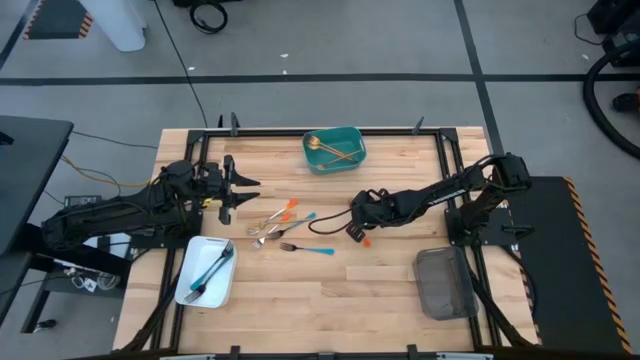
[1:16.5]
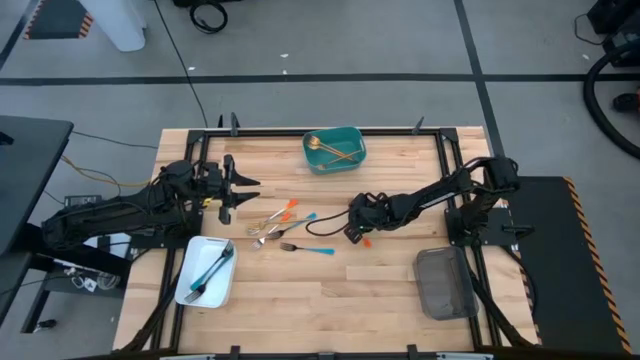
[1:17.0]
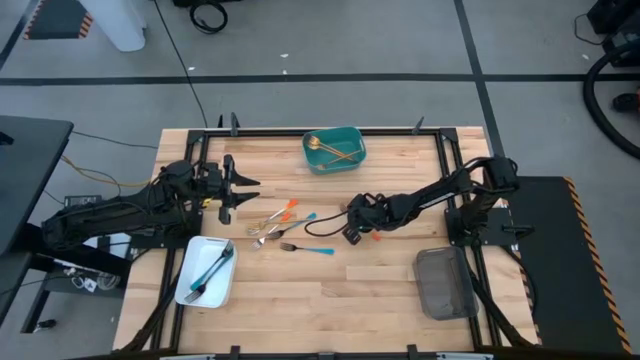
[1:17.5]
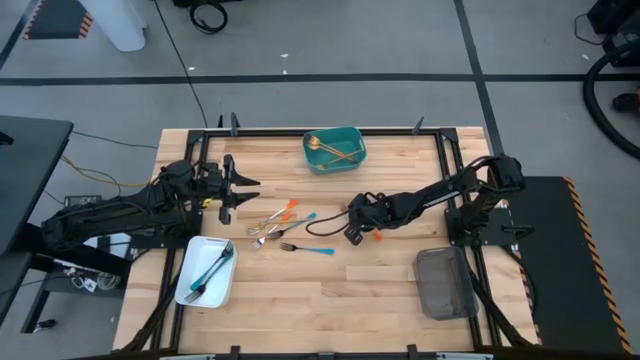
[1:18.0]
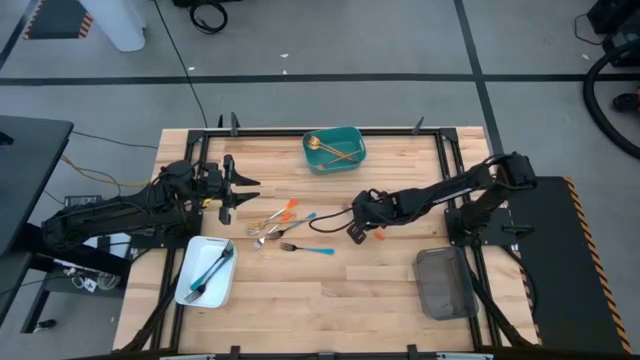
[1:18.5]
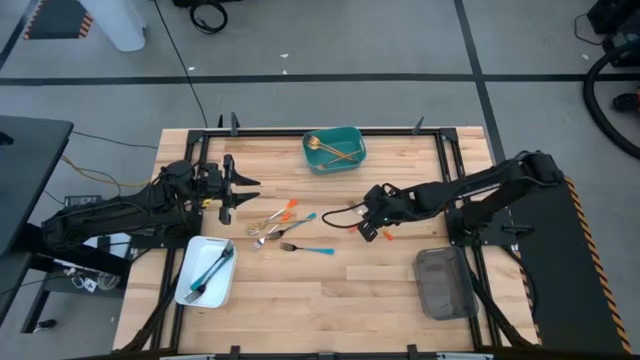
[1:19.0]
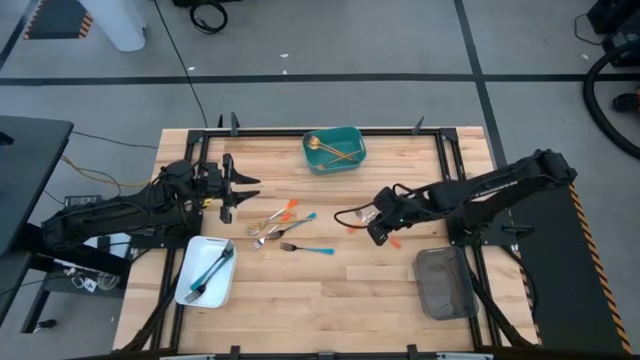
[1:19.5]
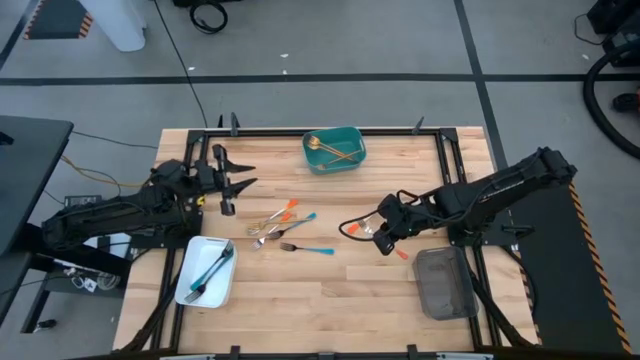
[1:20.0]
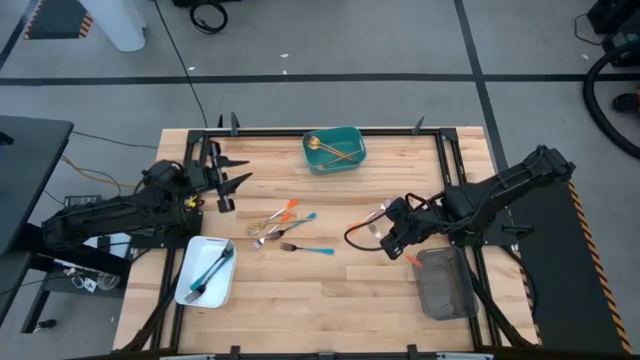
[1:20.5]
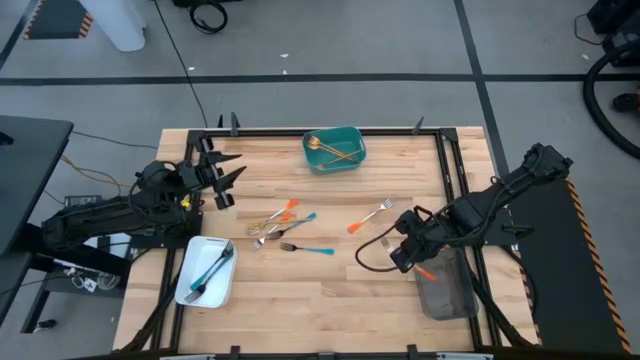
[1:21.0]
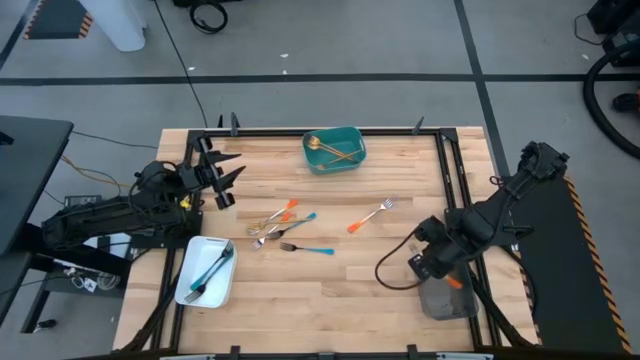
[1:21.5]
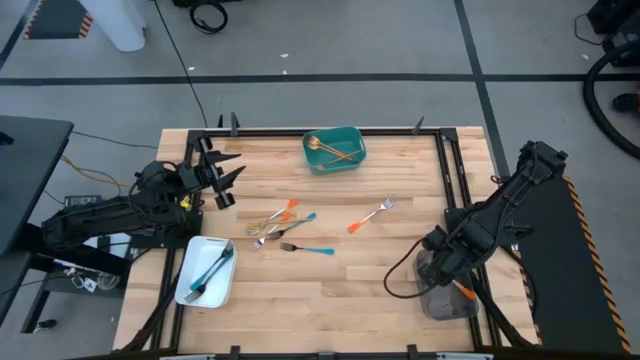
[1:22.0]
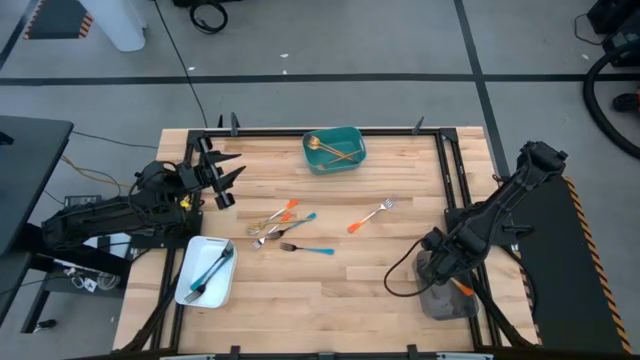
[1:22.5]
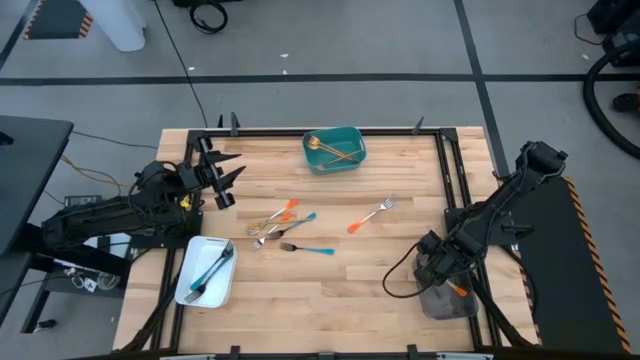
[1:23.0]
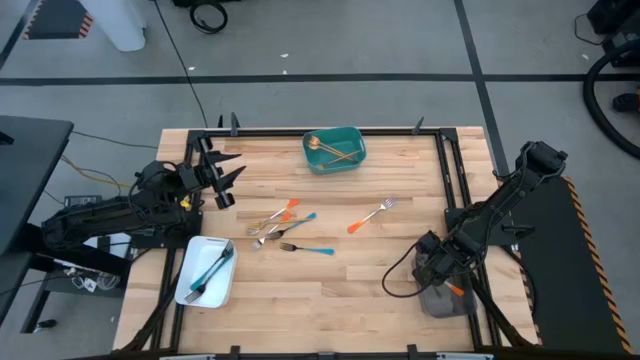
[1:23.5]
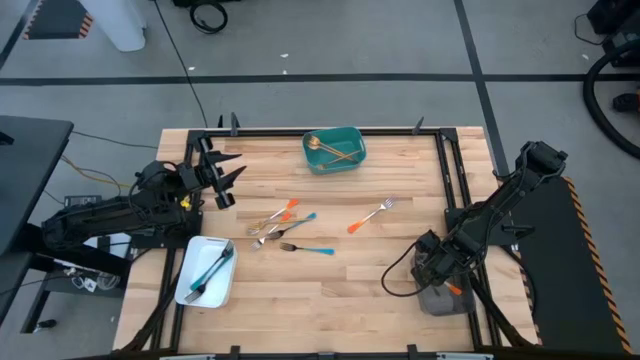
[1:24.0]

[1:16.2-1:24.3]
Task: Sort silverware by color (type)
Put the orange fork into the black bin

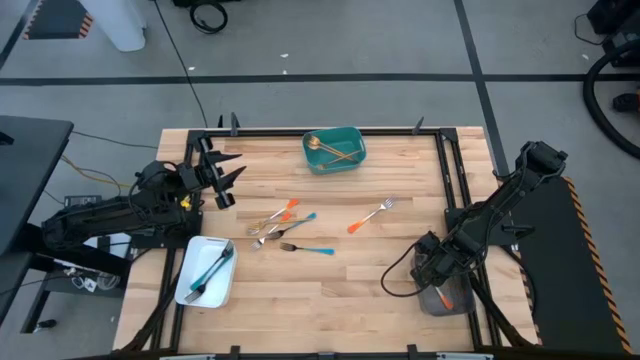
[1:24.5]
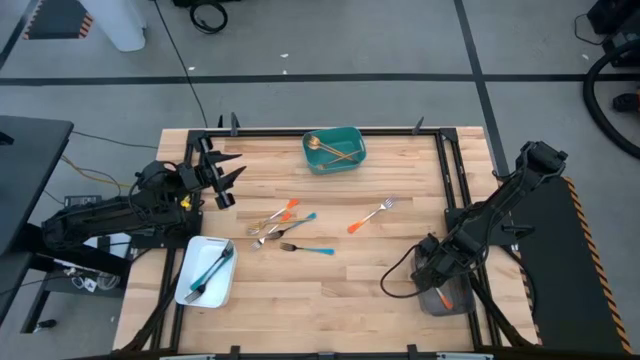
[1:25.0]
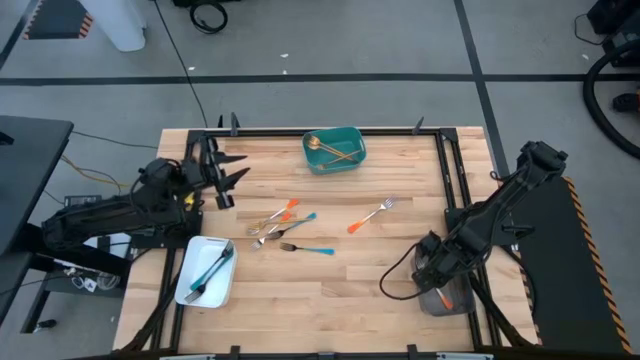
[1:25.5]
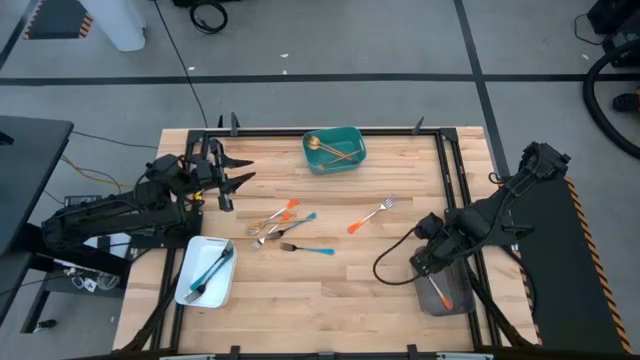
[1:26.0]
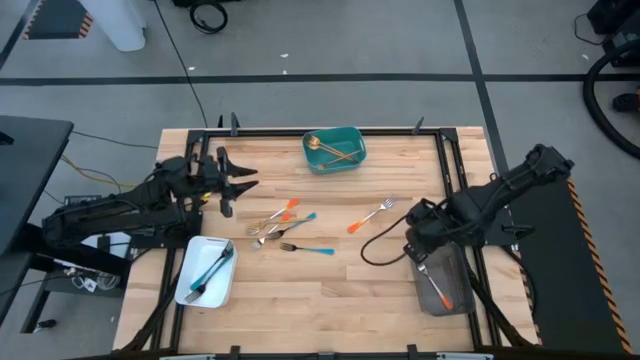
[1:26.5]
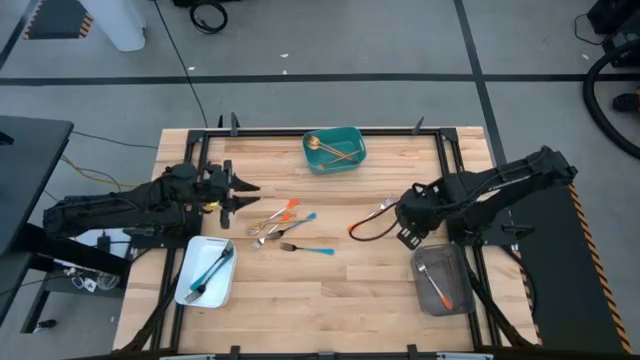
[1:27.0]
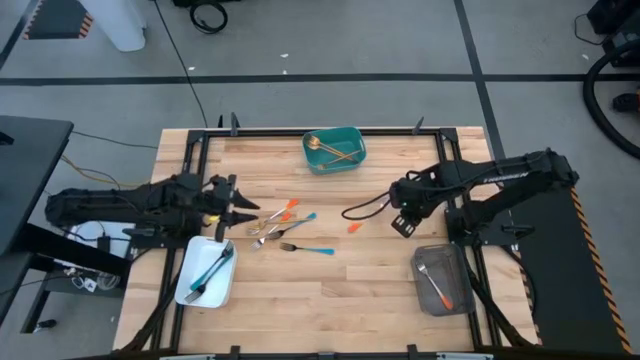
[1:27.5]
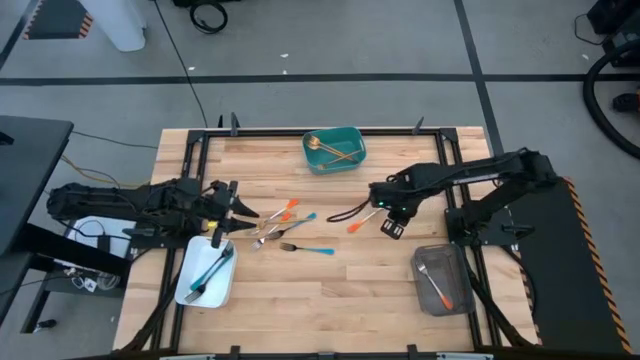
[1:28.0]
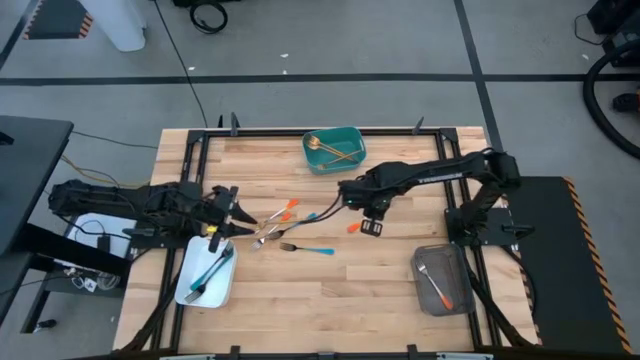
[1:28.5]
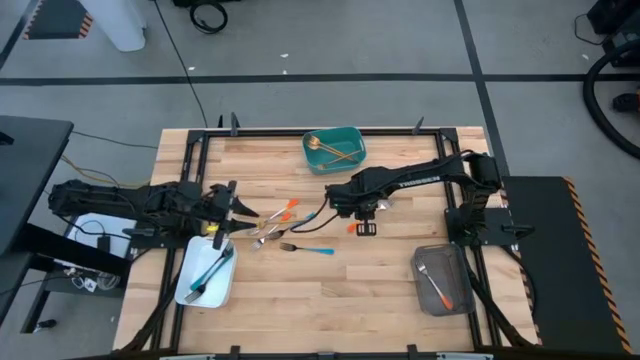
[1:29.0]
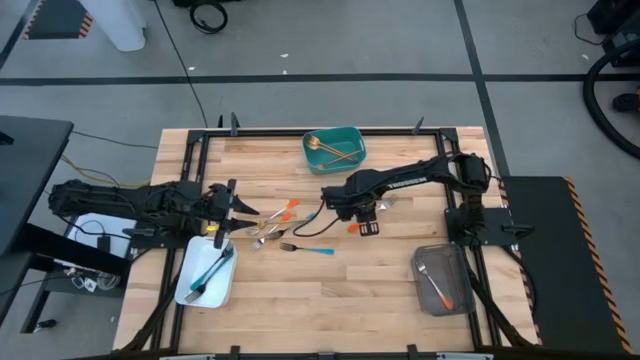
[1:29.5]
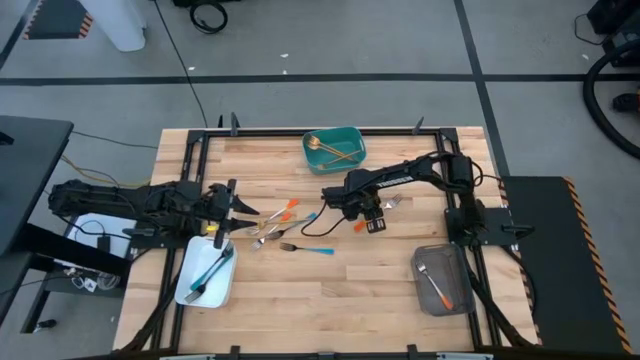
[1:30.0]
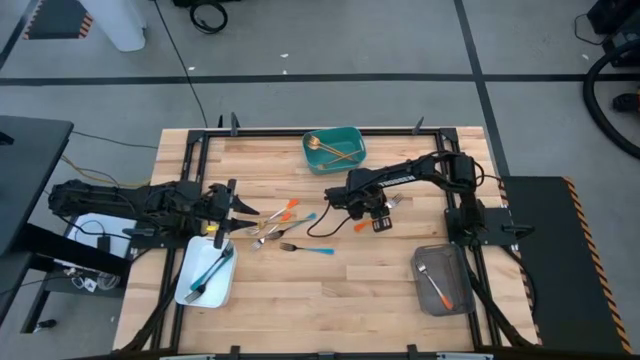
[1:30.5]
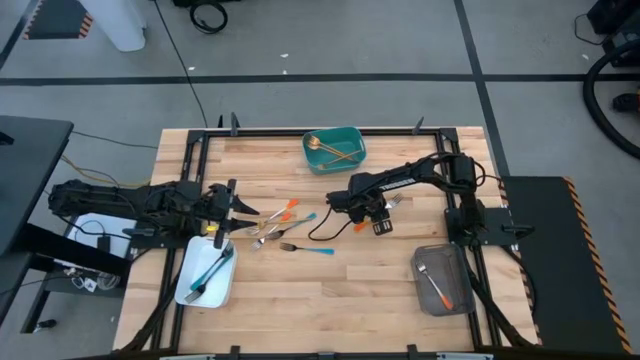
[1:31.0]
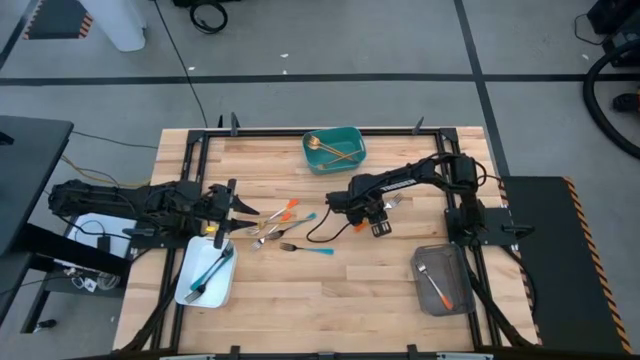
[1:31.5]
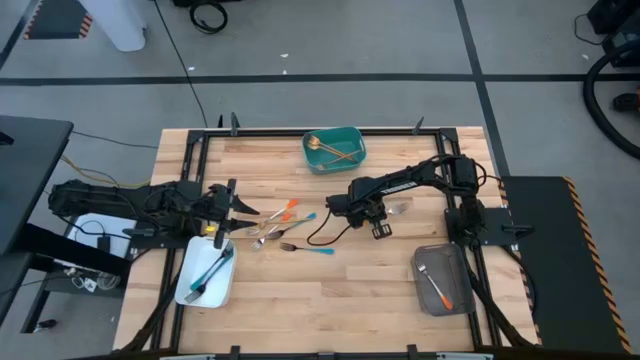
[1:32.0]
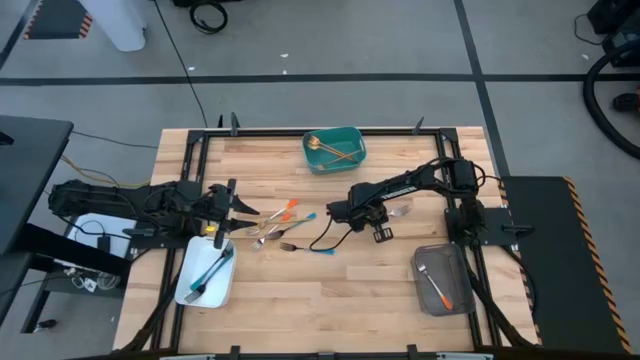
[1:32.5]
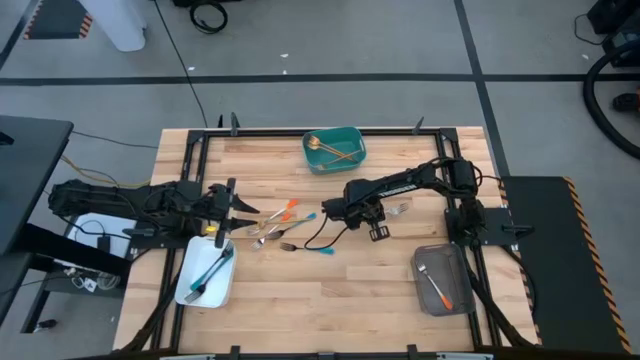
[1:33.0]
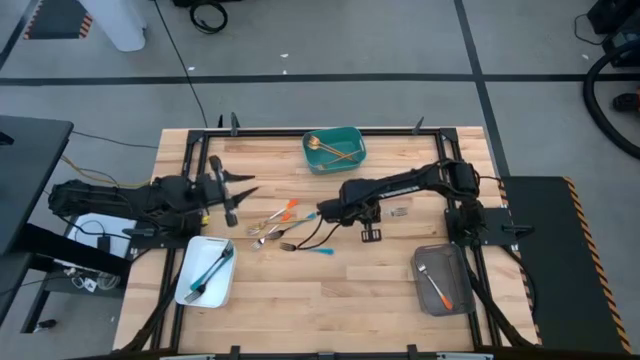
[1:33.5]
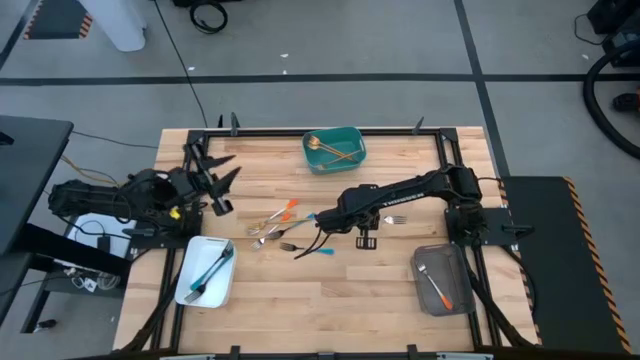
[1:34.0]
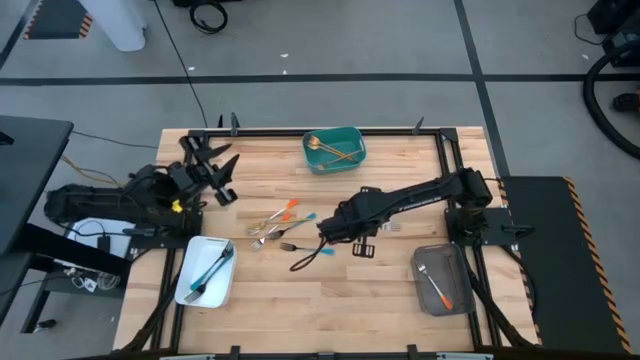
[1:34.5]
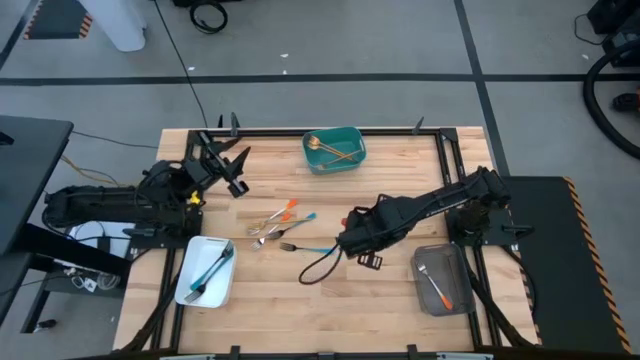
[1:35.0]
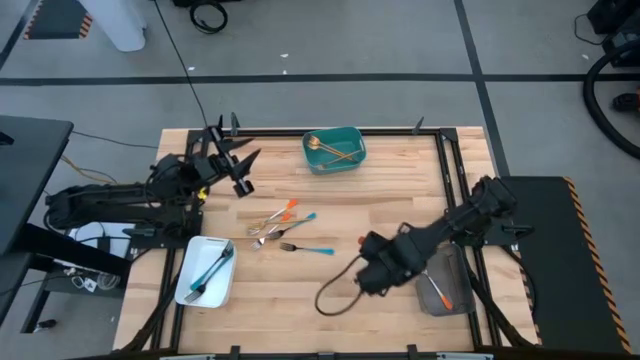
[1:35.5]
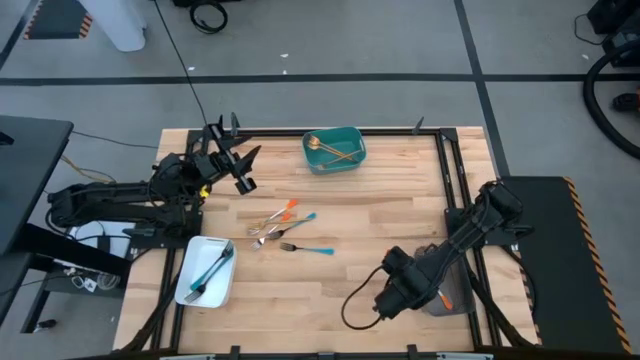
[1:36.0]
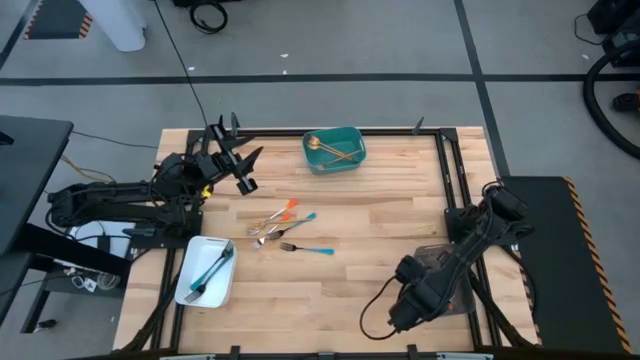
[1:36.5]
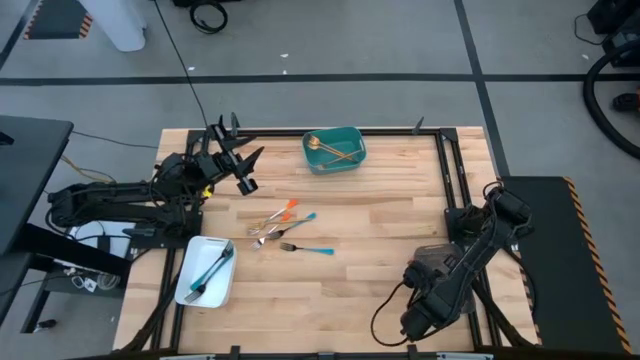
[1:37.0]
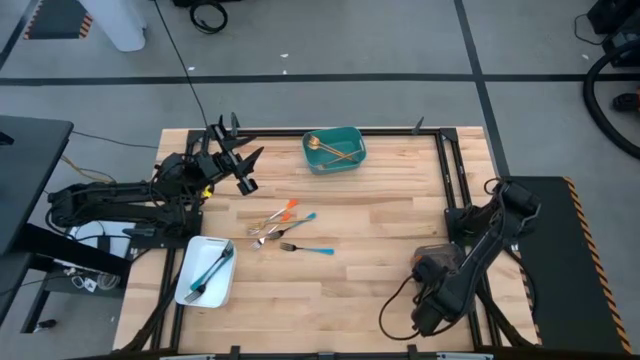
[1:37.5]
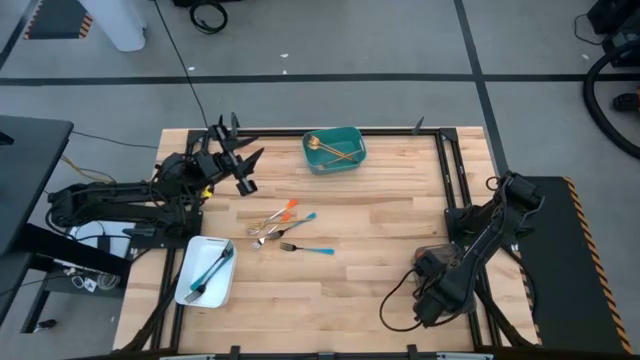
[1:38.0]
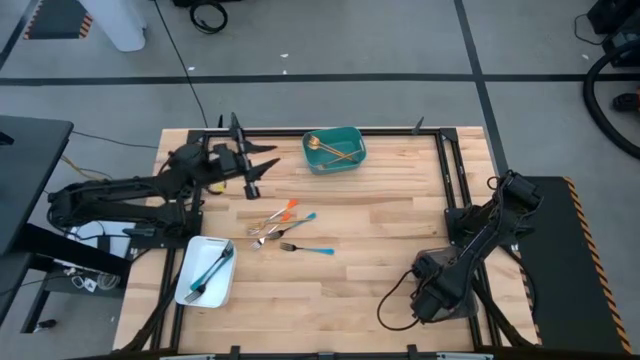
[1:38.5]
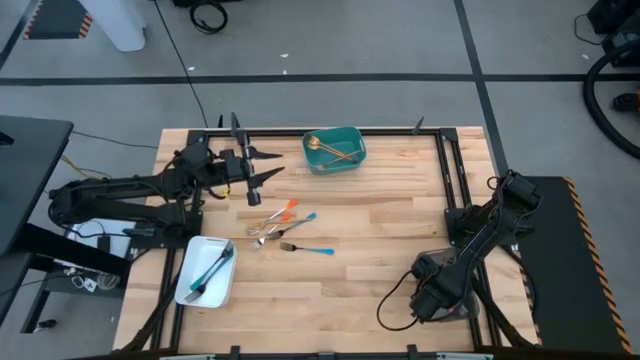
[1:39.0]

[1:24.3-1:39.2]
Put the orange fork into the black bin
